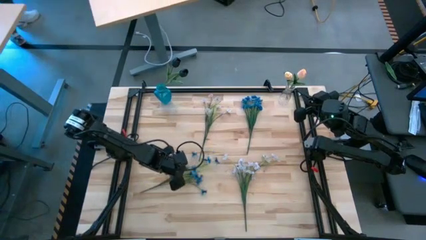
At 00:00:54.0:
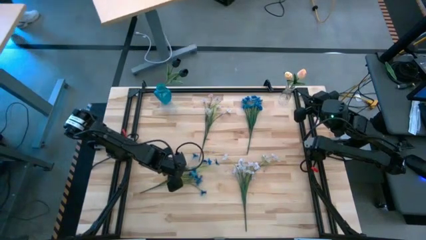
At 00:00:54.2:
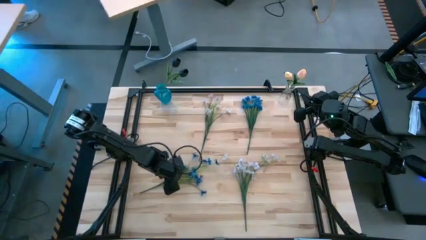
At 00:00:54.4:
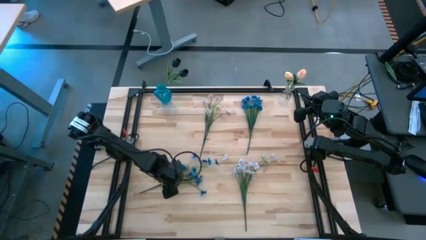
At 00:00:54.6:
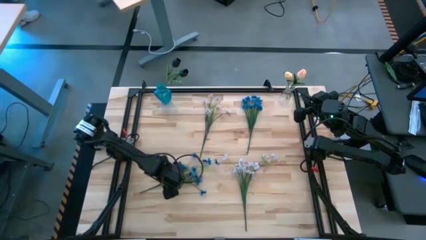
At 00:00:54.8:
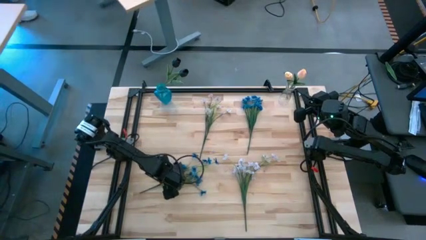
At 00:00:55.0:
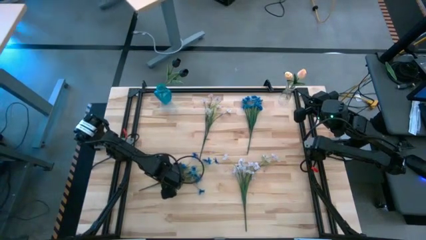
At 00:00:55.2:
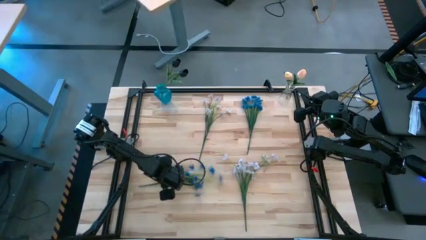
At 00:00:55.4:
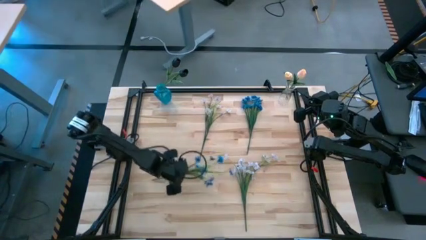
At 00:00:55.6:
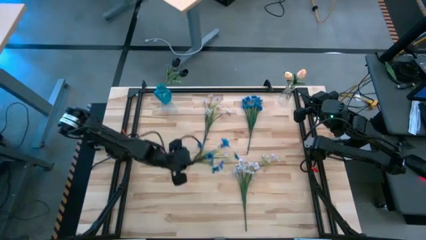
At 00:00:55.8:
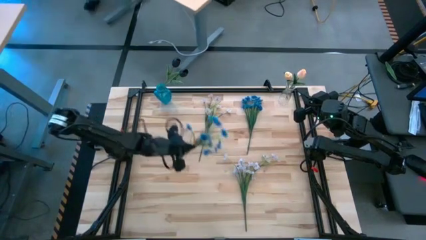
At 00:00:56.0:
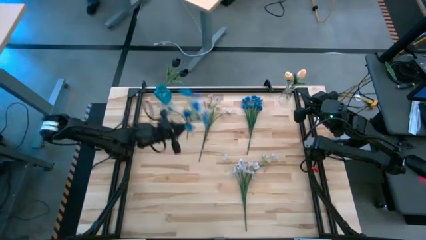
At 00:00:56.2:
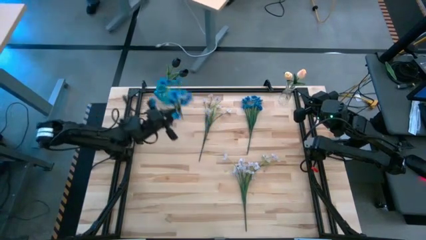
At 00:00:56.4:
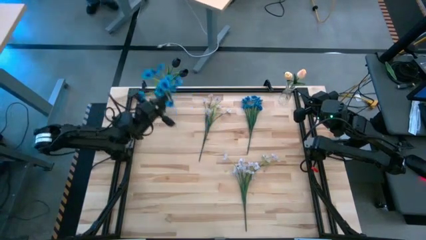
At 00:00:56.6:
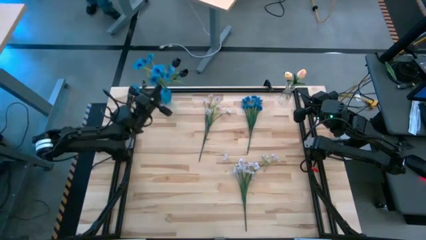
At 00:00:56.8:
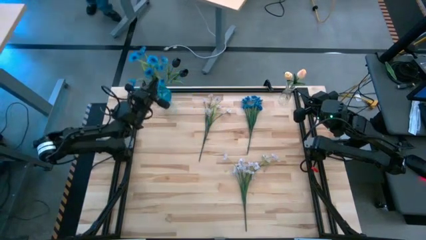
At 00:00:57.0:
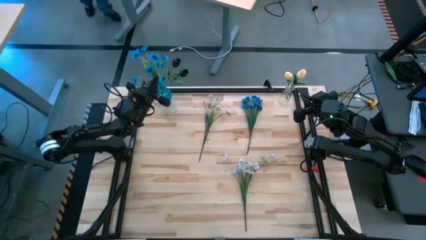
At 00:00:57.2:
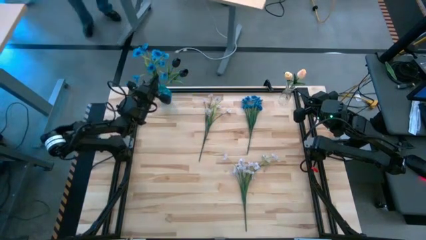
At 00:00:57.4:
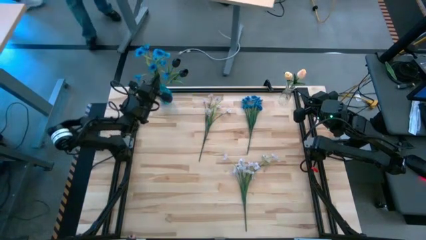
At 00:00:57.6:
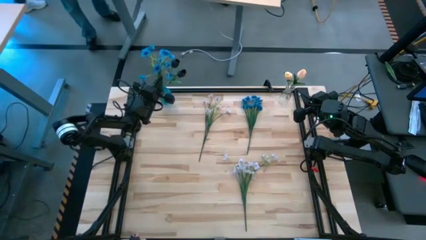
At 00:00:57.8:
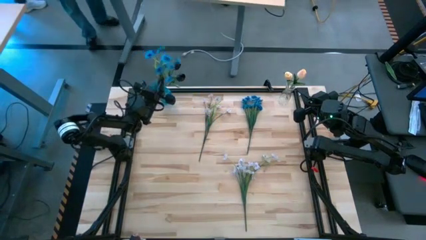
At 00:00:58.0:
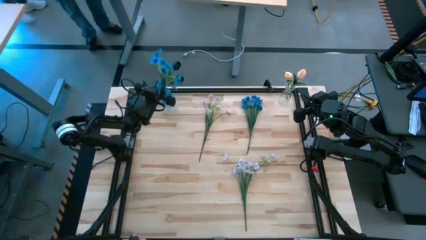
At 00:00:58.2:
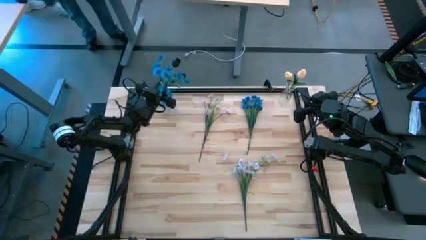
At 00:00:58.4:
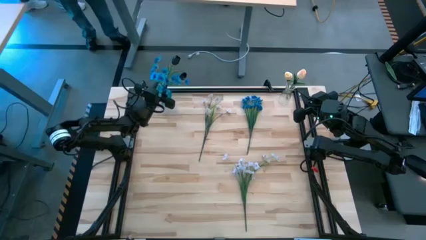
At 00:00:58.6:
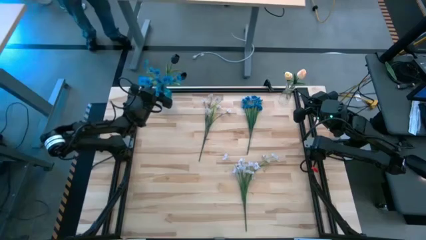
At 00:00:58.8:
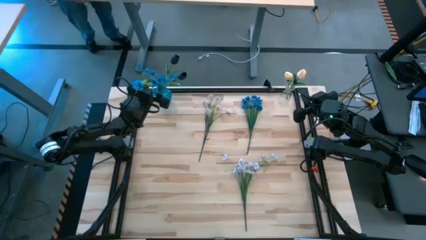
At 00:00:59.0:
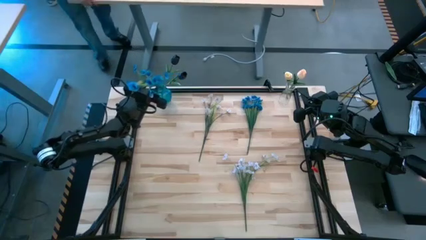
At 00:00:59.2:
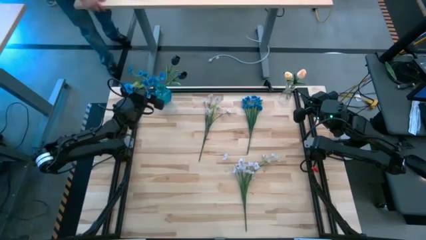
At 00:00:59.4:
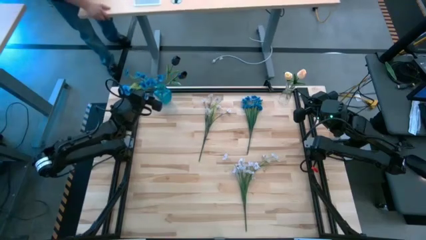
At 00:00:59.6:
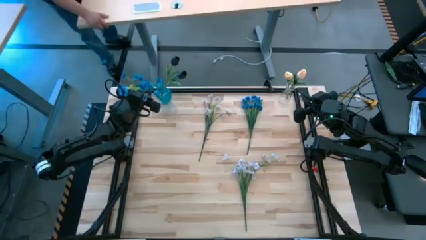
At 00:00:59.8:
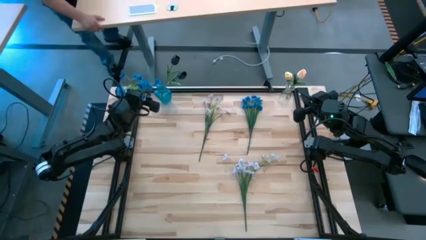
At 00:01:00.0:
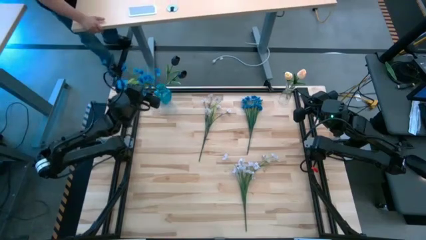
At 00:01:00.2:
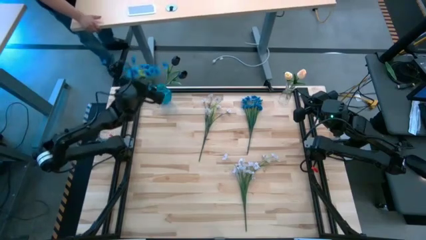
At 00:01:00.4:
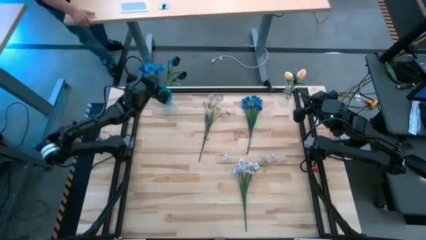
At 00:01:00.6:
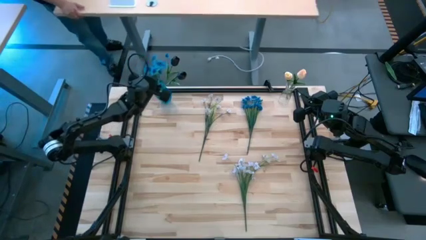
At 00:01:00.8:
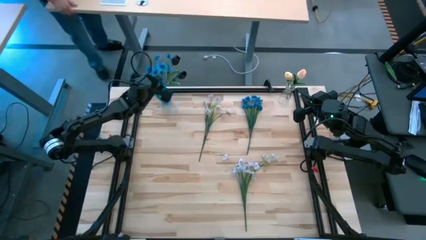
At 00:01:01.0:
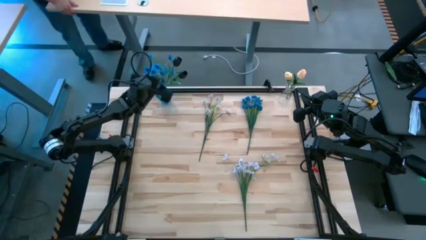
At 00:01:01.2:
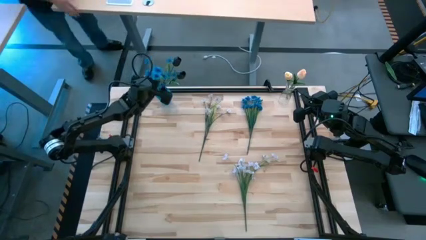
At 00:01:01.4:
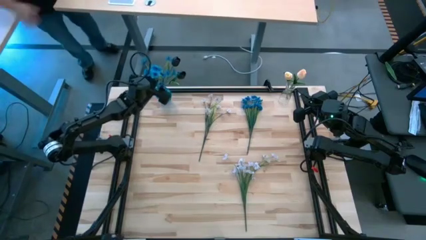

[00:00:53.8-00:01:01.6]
Task: Sort flowers into vase by color
Put the bottom blue flowers into the blue vase
